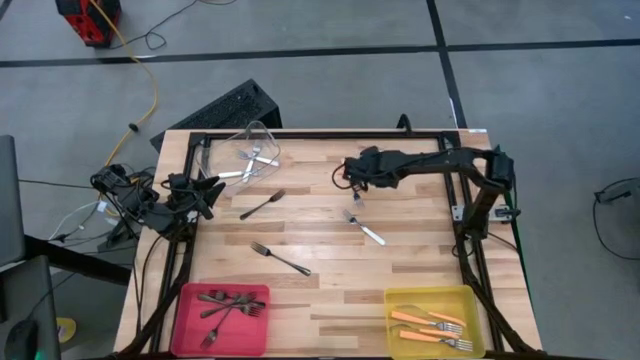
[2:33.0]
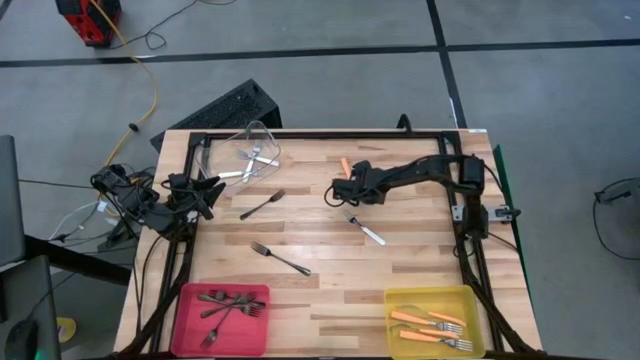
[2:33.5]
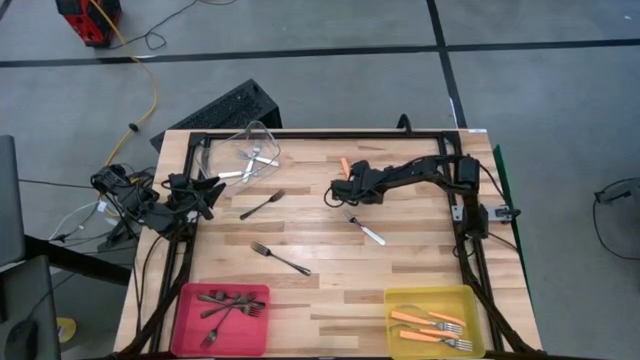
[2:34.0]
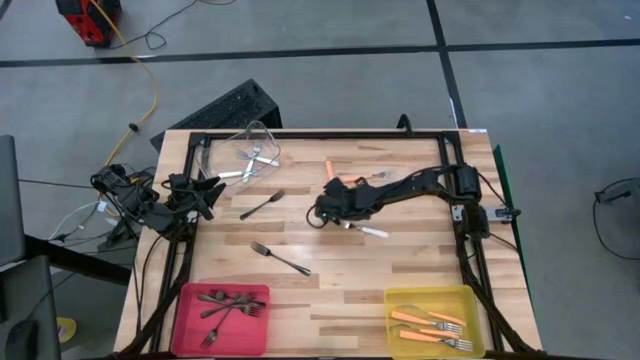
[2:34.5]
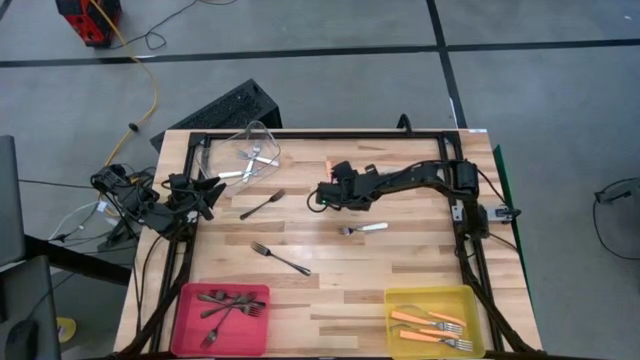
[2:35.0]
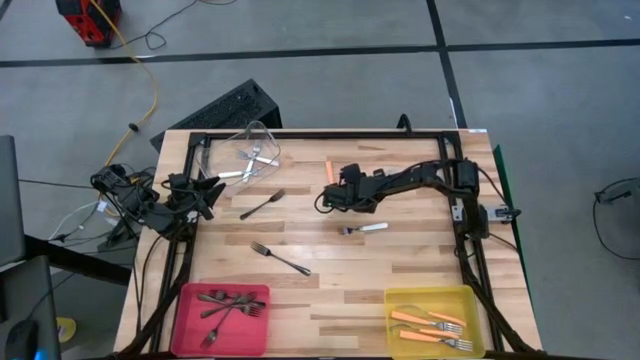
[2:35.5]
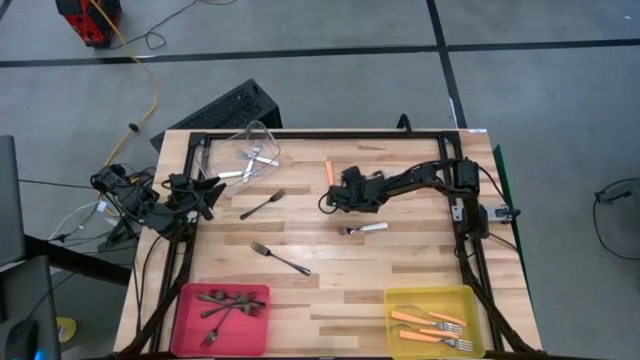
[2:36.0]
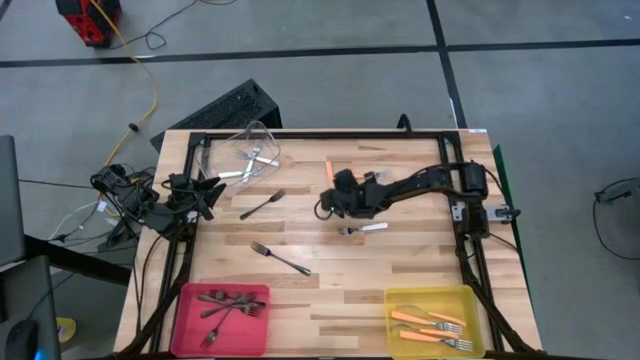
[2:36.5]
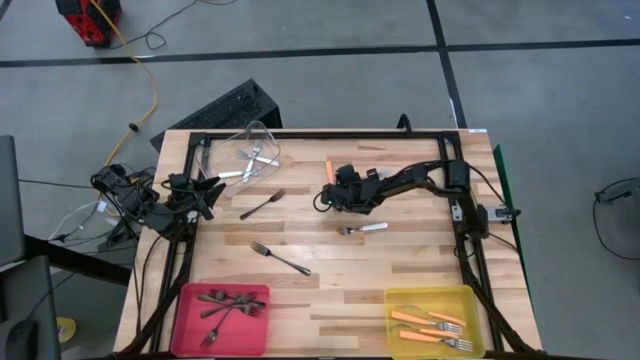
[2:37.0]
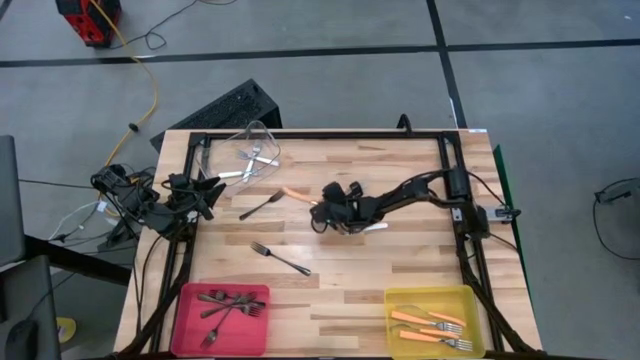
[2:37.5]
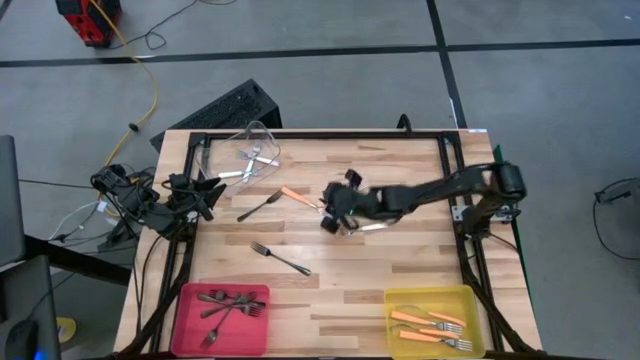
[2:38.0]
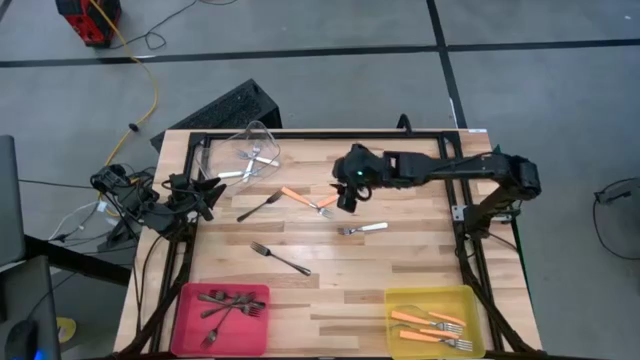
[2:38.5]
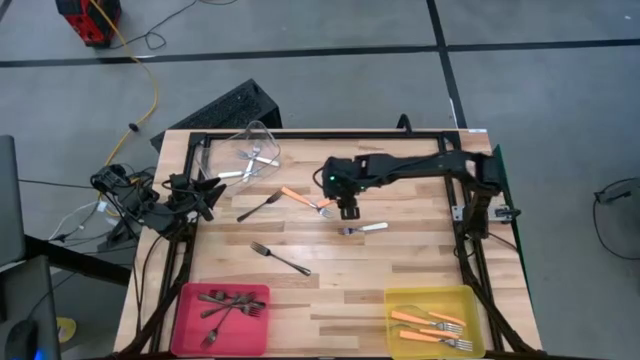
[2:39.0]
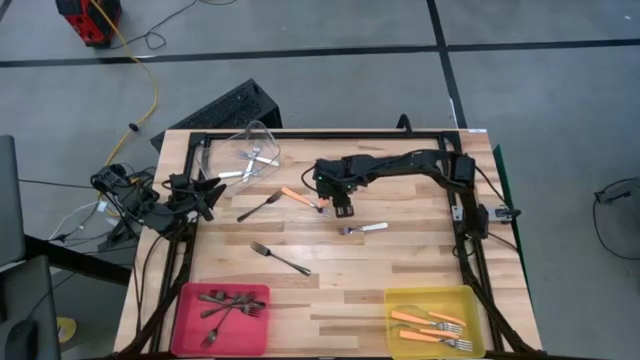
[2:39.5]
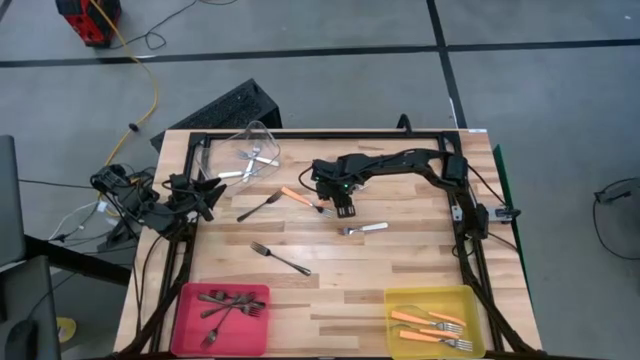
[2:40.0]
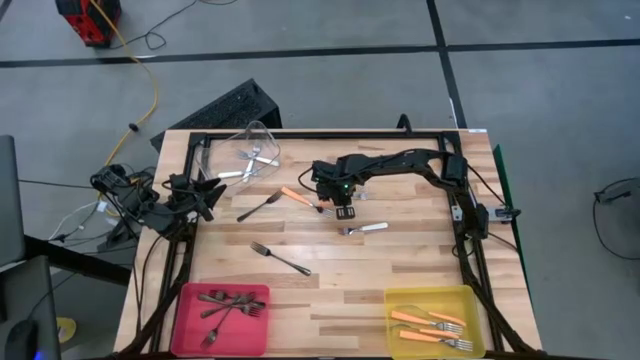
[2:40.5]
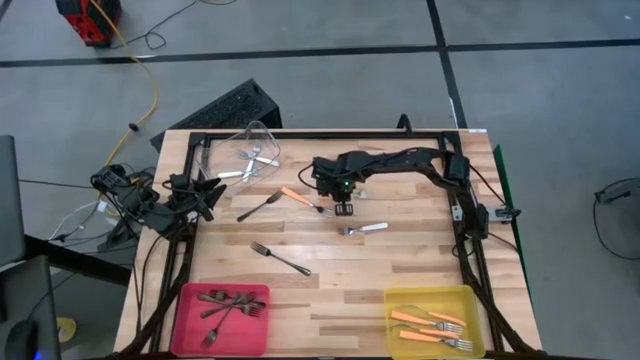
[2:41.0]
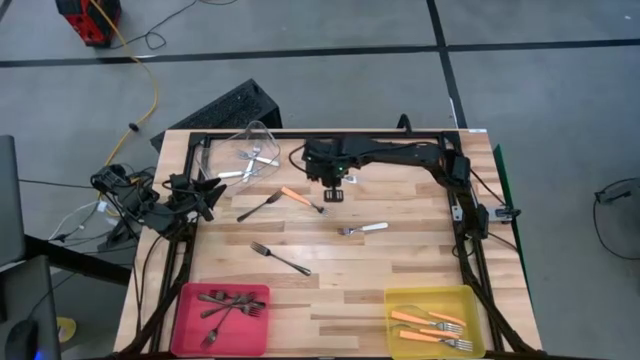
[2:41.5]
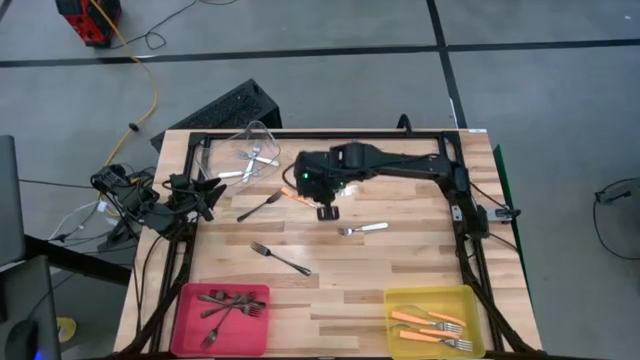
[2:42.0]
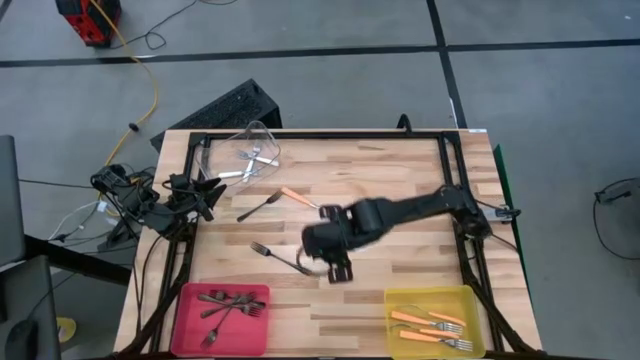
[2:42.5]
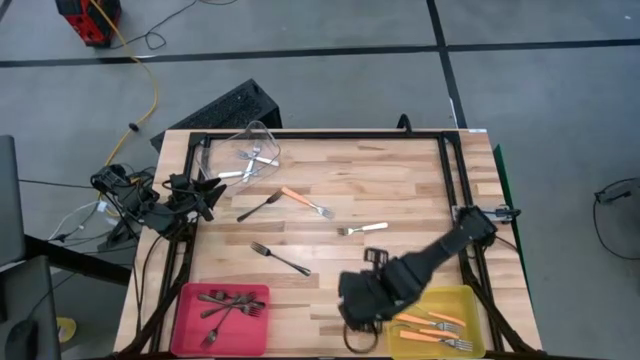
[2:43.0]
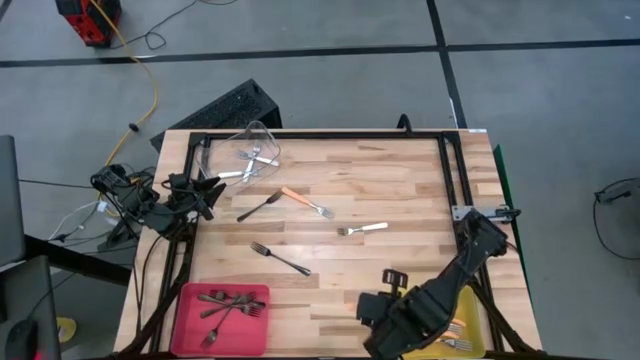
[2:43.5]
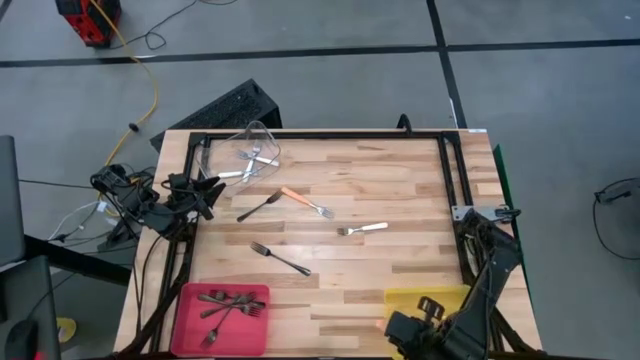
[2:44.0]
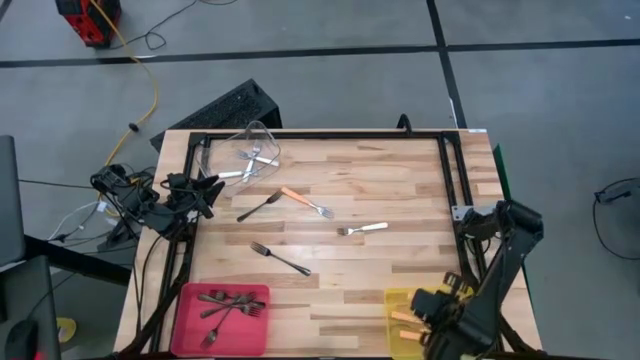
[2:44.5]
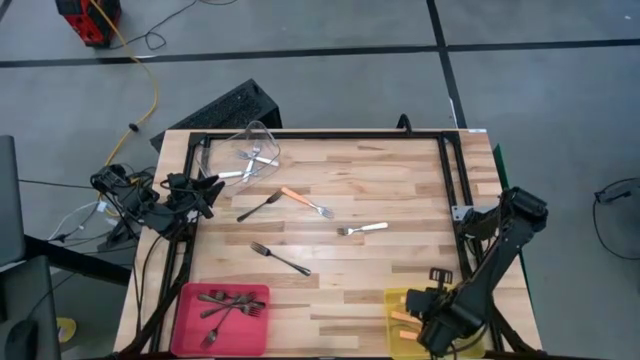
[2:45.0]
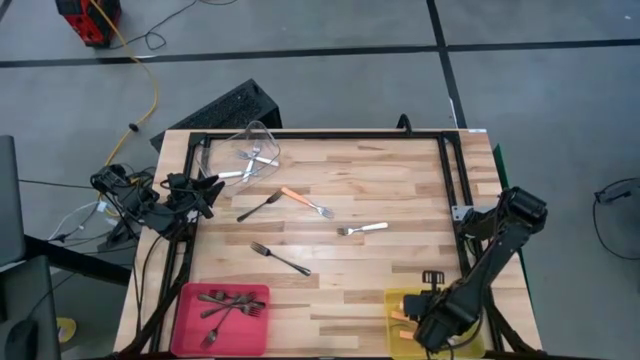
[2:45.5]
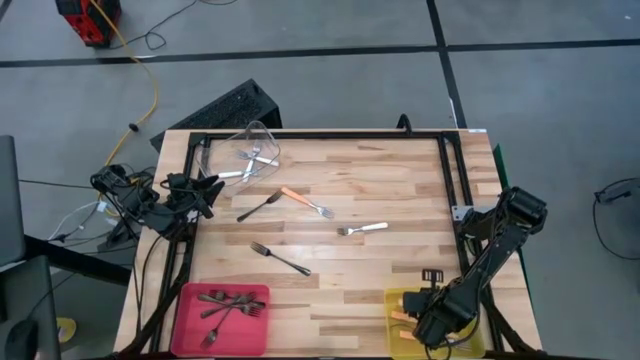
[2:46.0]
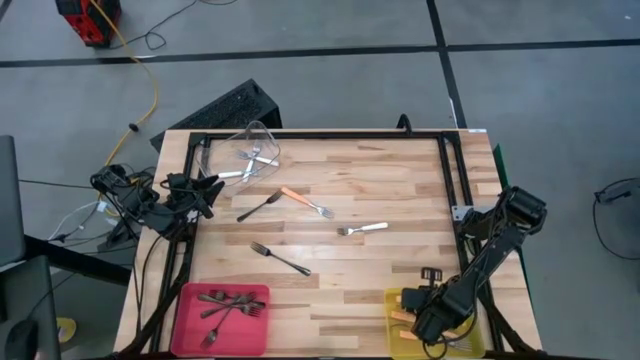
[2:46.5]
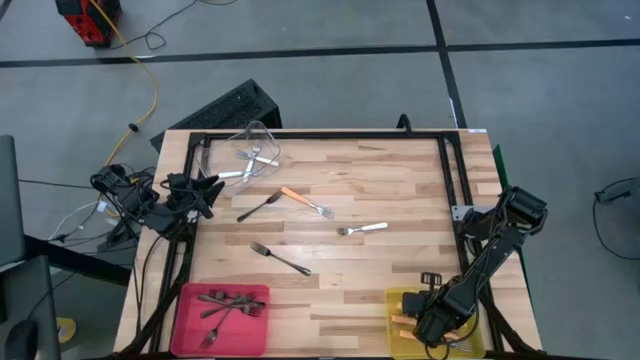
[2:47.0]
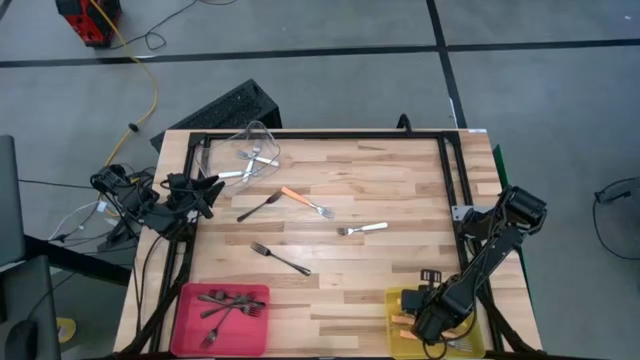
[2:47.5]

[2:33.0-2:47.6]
Task: Sort silverware by color (type)
Put the orange fork into the yellow bin

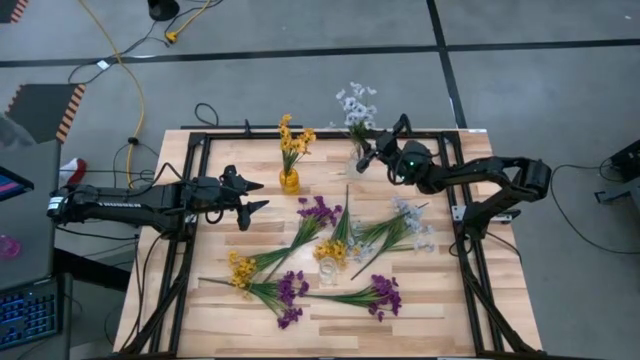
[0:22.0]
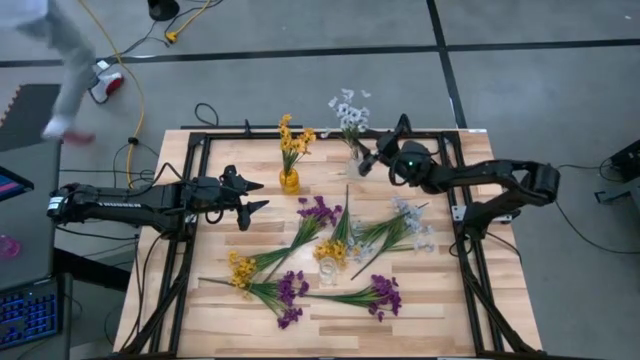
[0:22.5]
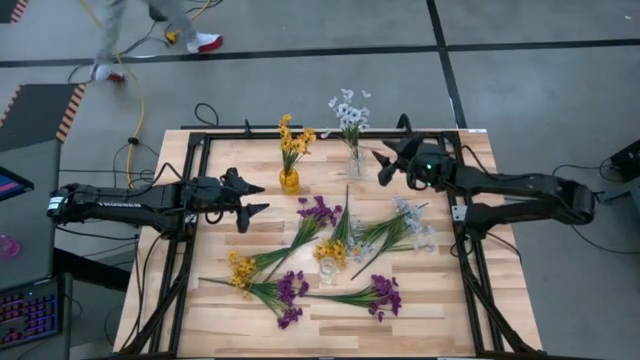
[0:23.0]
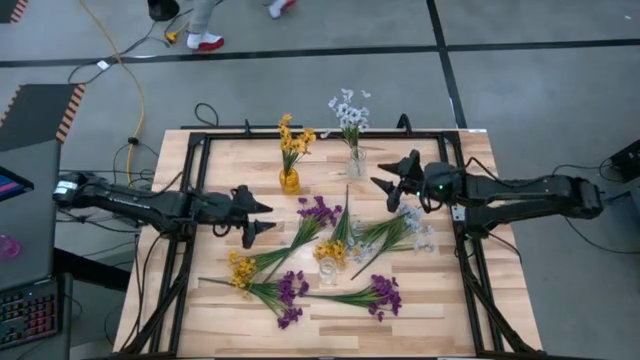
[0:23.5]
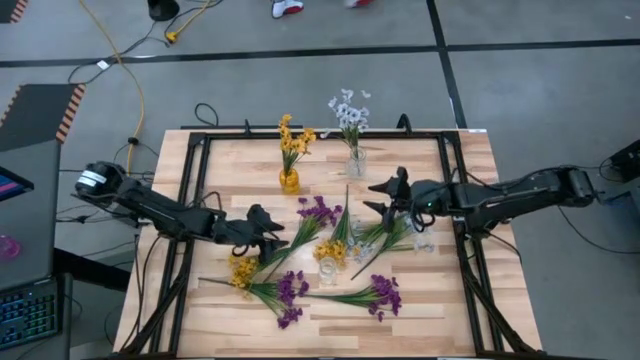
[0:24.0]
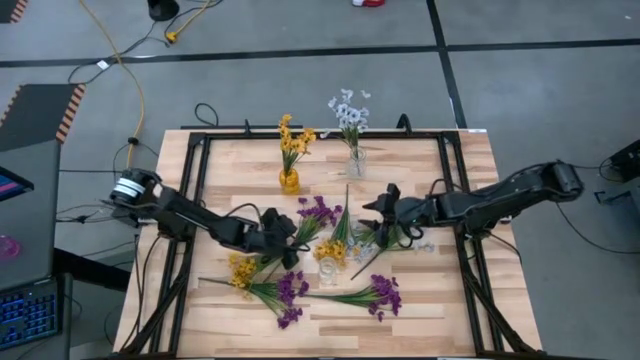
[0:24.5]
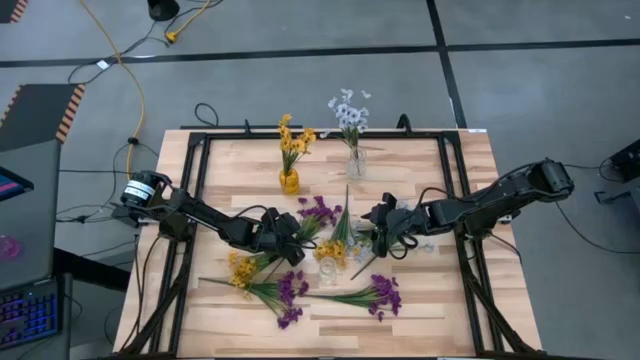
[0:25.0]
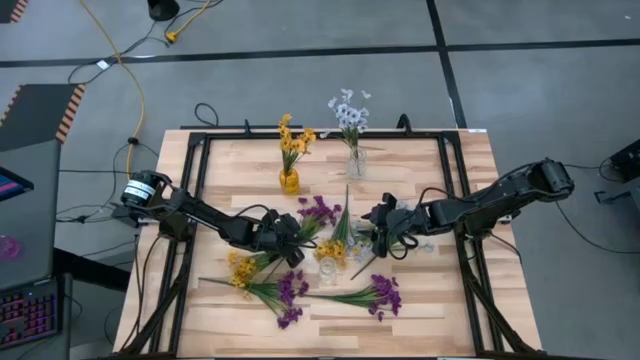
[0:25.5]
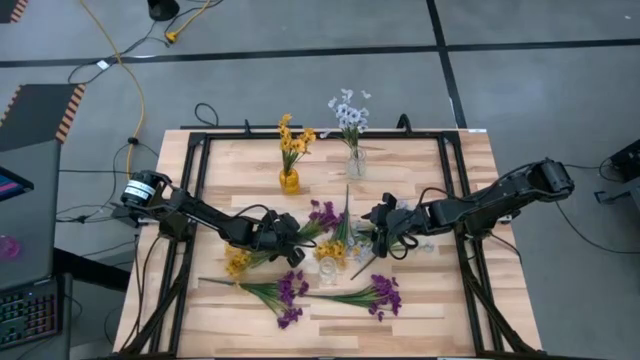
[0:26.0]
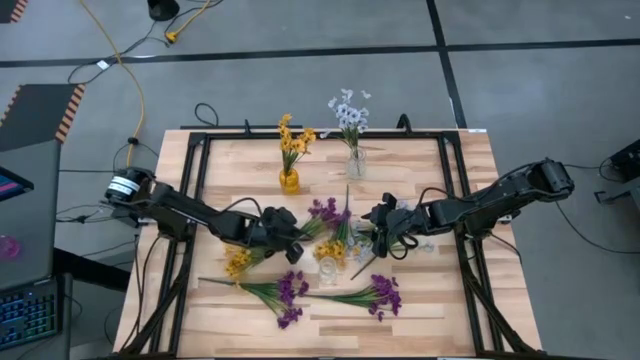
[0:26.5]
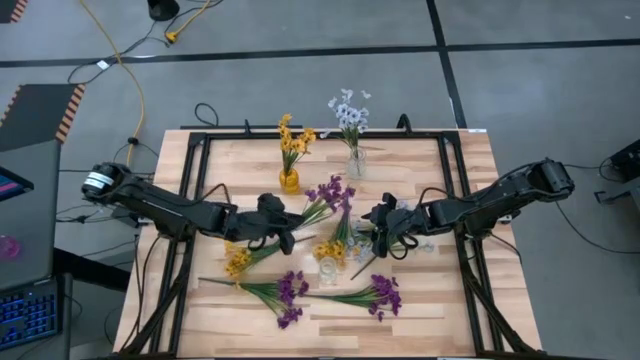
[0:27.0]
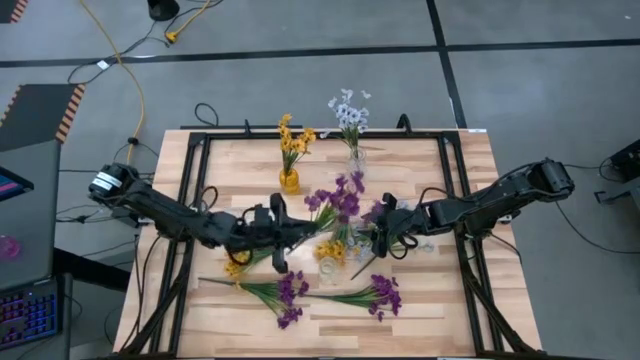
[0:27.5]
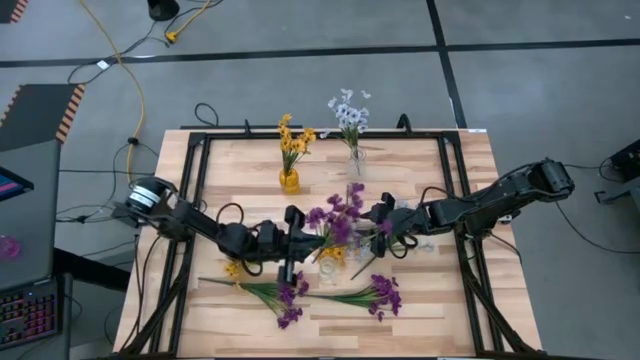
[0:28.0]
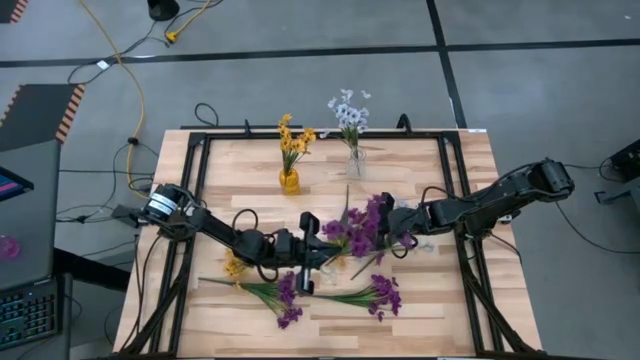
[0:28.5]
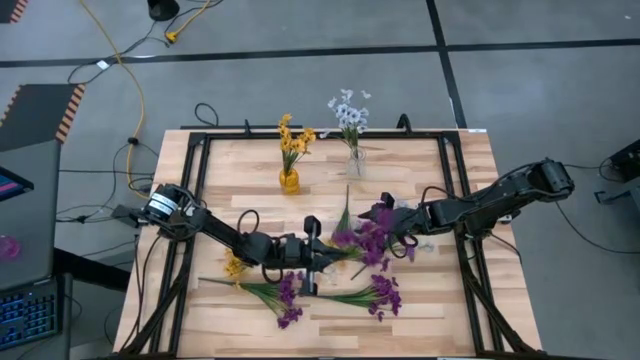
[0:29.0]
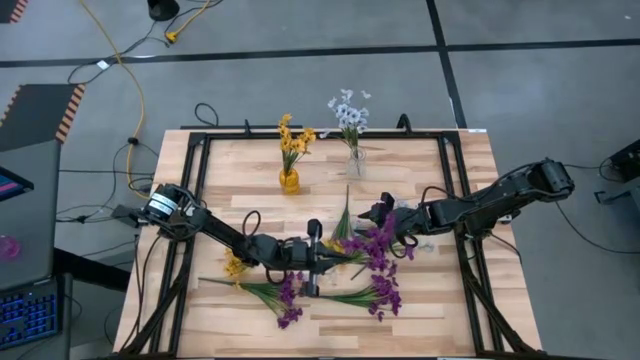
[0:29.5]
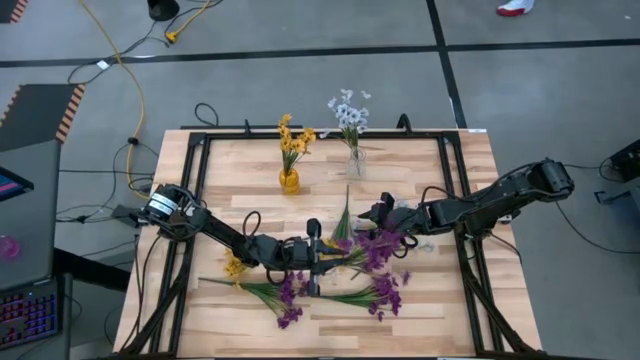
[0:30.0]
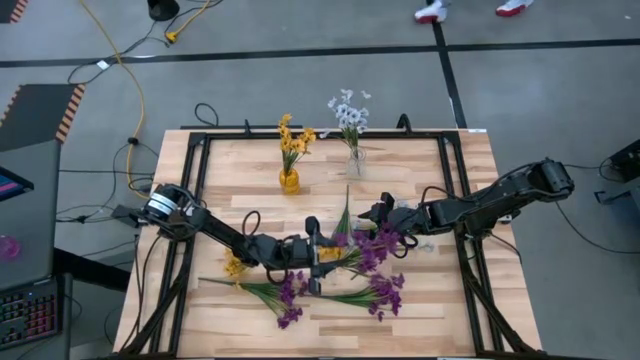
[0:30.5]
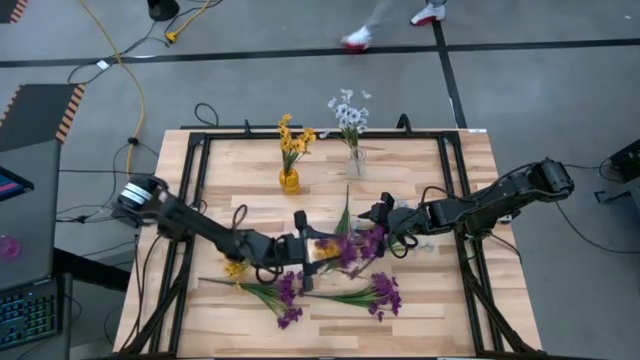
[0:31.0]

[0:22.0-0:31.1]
Task: Sort flowers into vase by color
Put the top violet flowers into the bottom transparent vase
